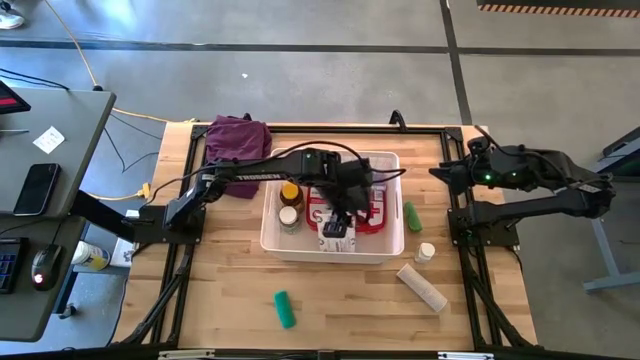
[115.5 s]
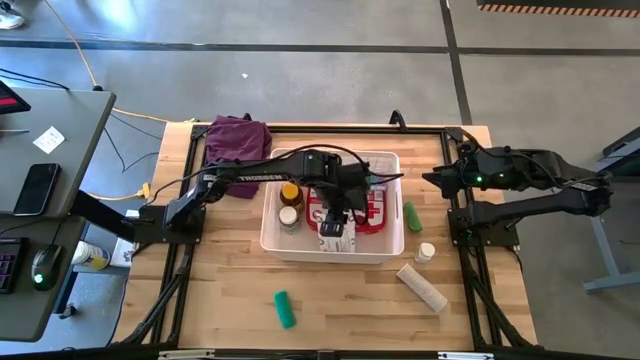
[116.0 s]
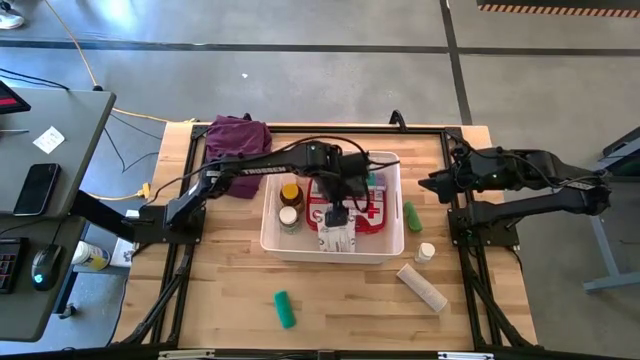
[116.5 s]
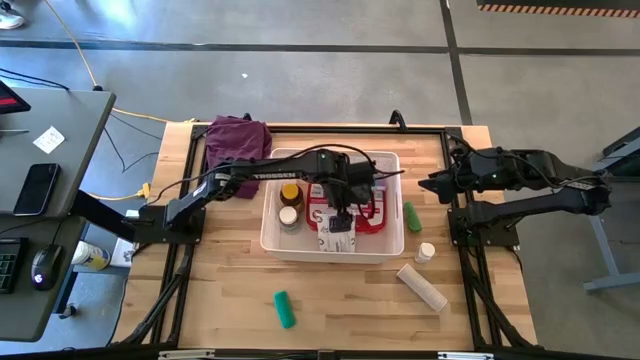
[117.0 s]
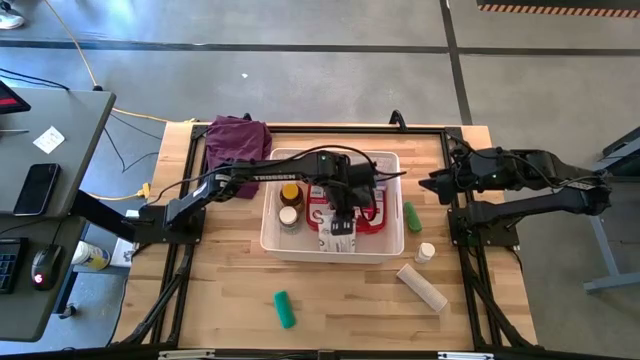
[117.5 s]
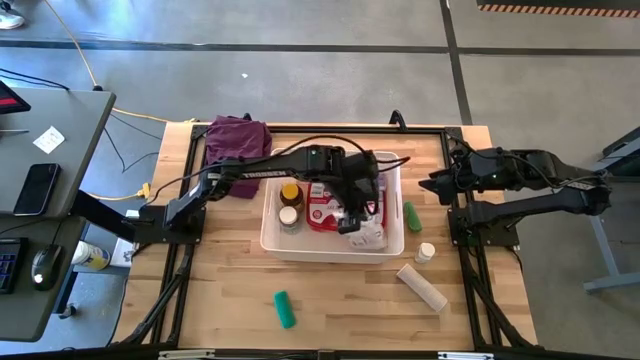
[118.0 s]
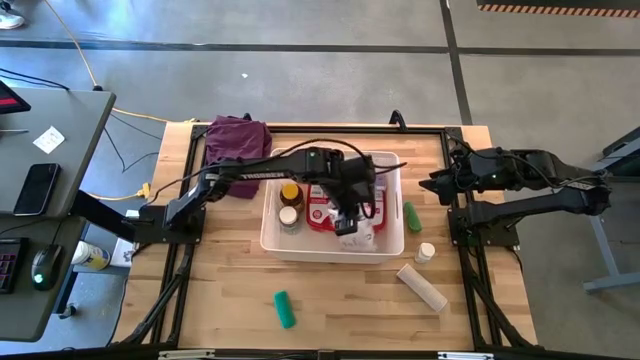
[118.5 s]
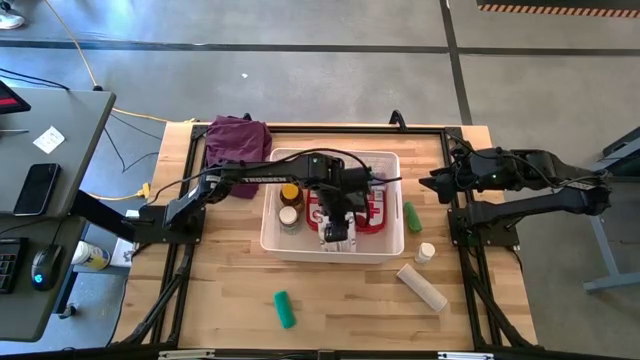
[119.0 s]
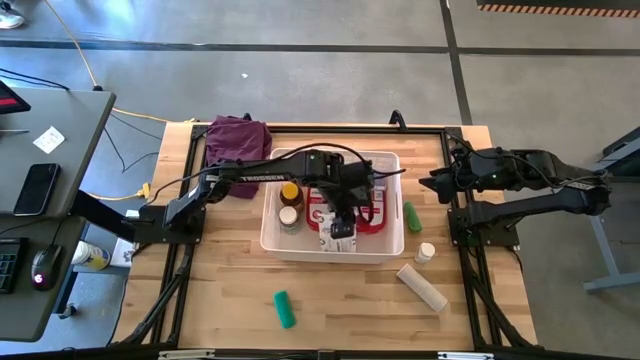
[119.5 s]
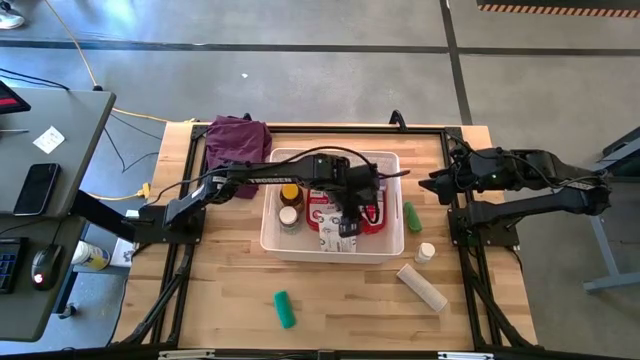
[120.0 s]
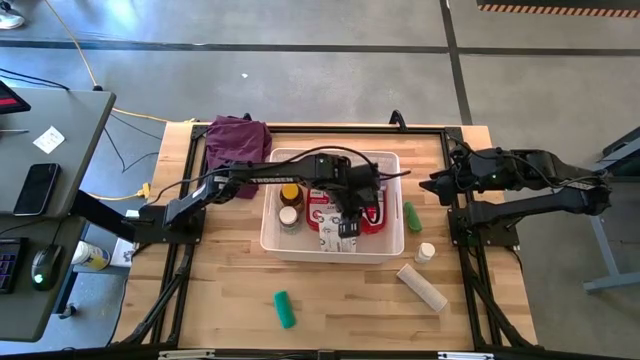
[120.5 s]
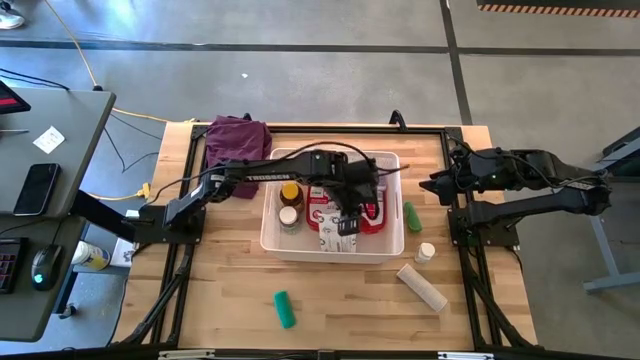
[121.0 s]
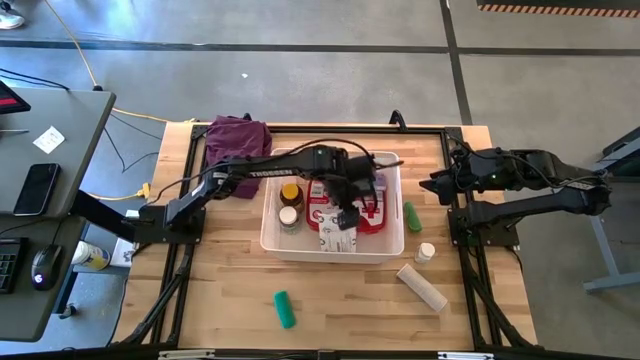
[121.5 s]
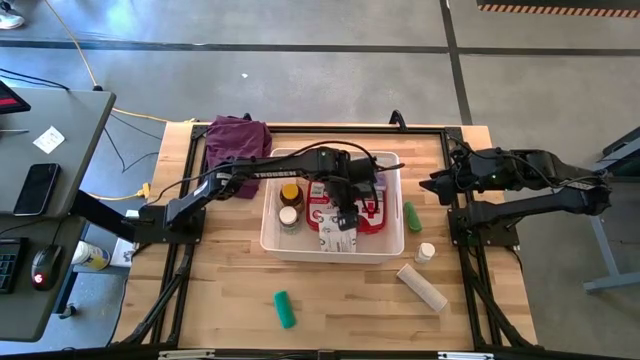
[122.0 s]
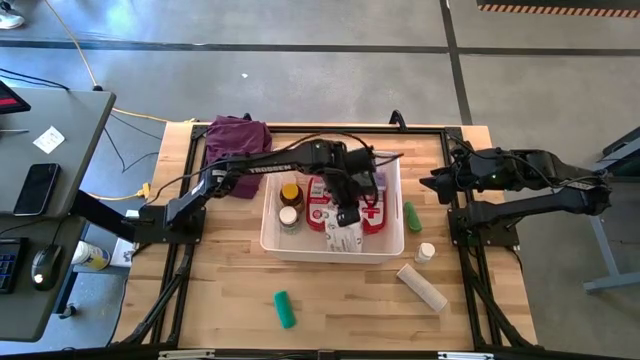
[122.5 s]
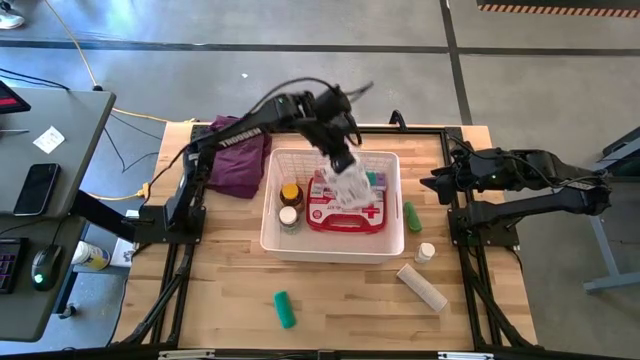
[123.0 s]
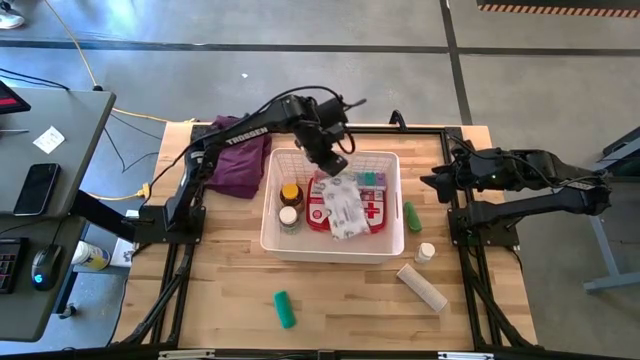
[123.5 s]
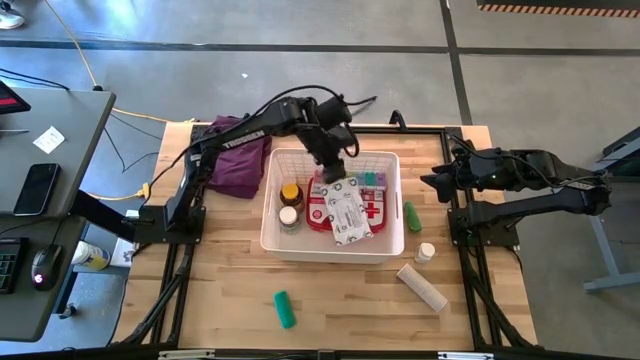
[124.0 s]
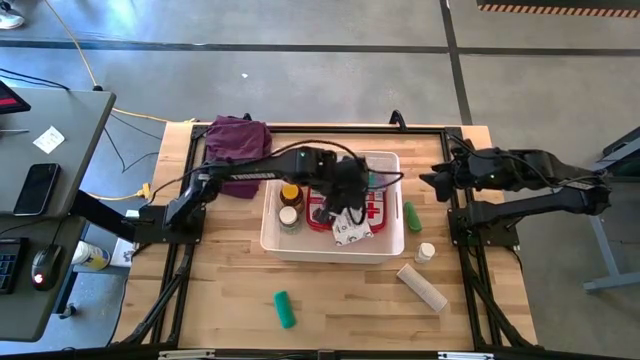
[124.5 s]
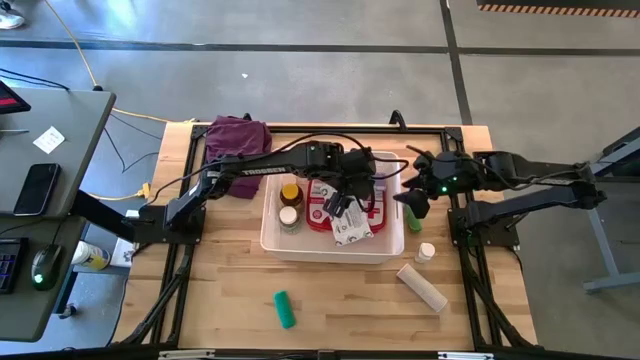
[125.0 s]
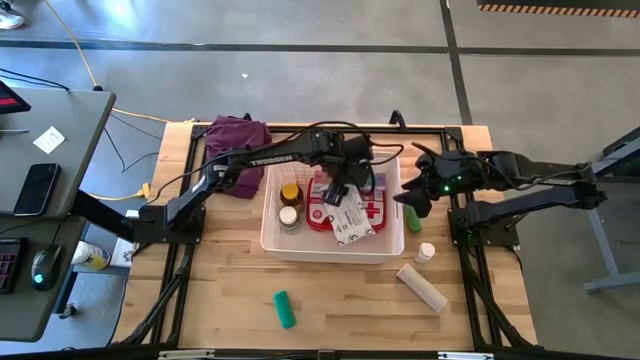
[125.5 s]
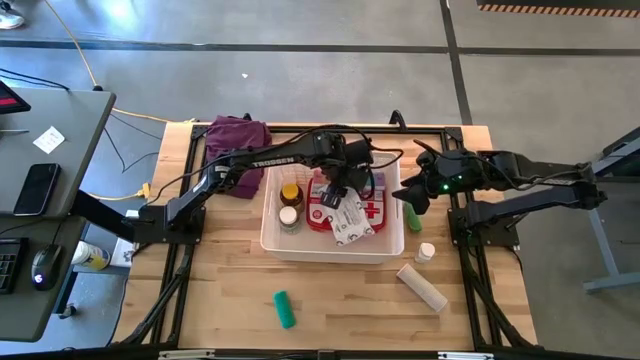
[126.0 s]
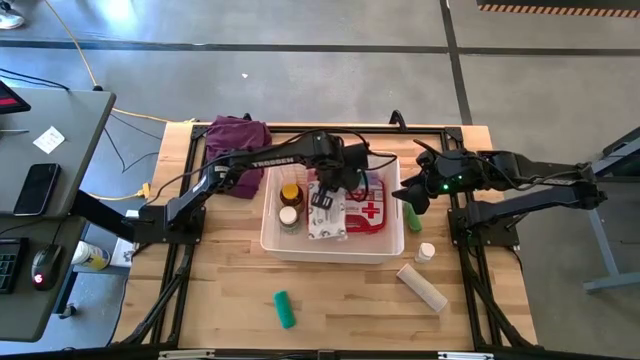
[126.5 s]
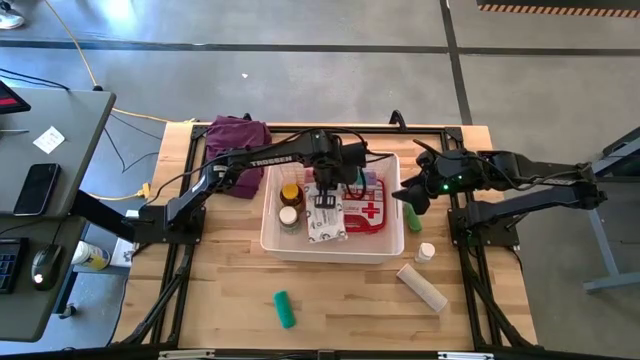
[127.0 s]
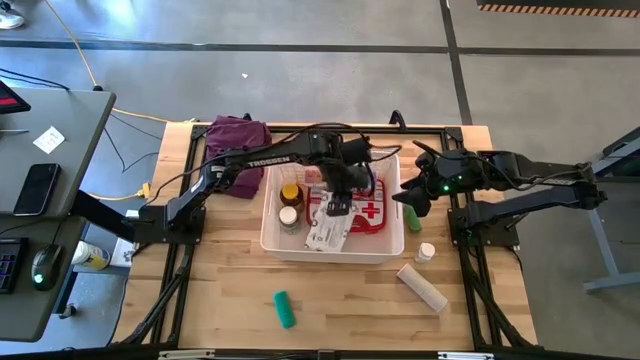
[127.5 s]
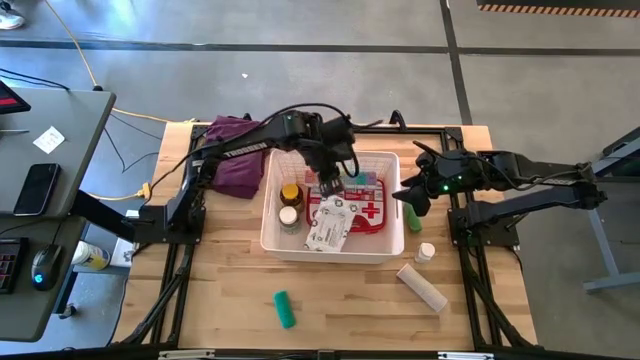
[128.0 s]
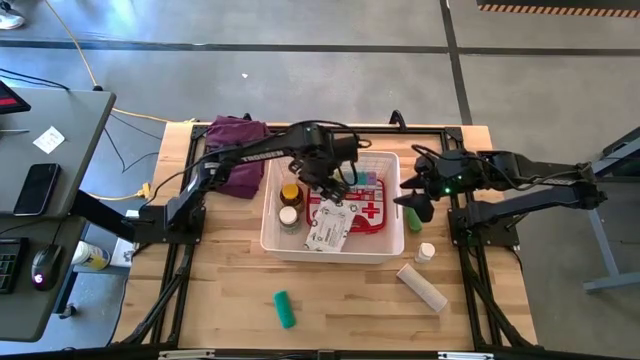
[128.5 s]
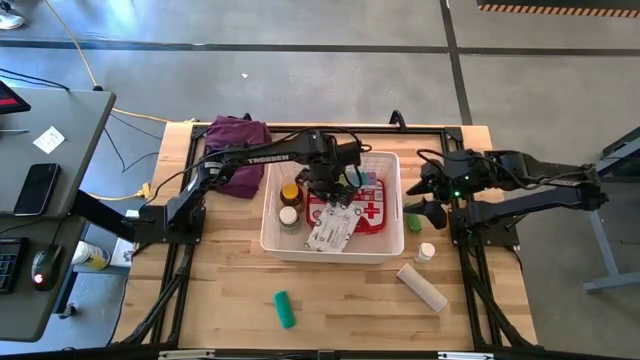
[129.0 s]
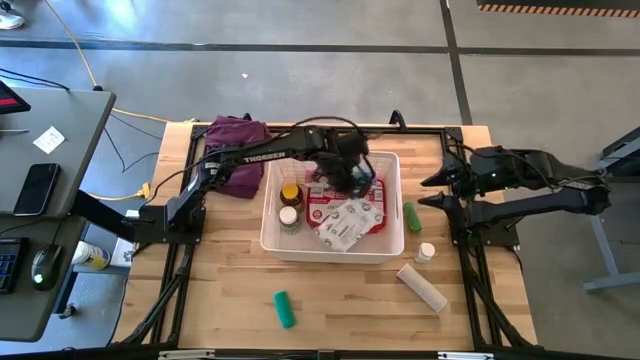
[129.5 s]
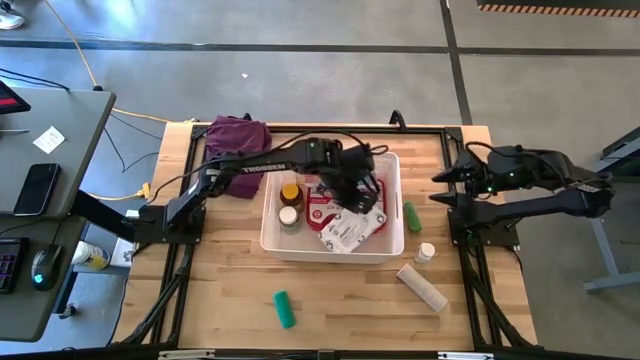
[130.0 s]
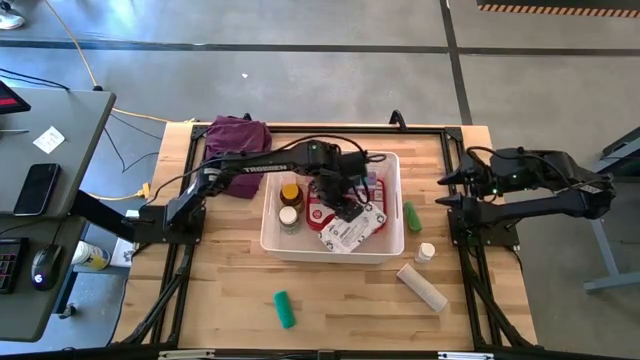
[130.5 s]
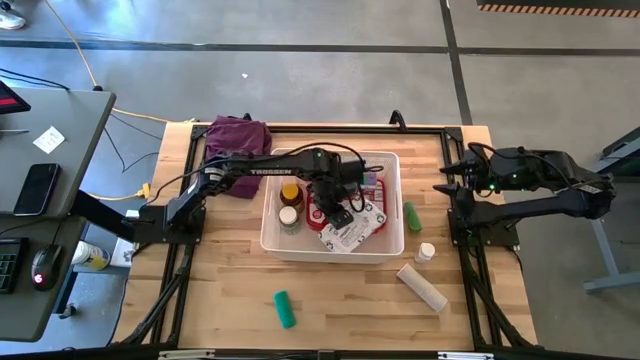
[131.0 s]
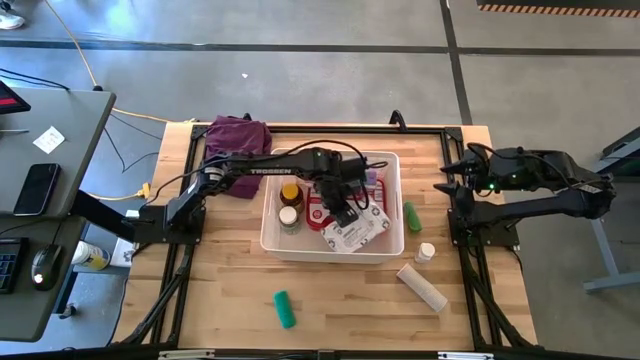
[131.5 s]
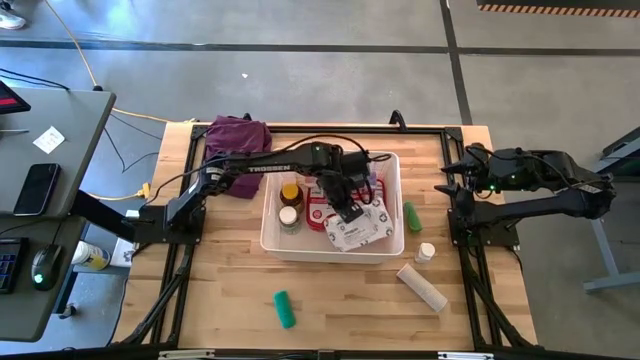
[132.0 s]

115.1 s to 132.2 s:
Task: Pick & place medical supplies in basket/bin
Put the white mailer bag into the white bin

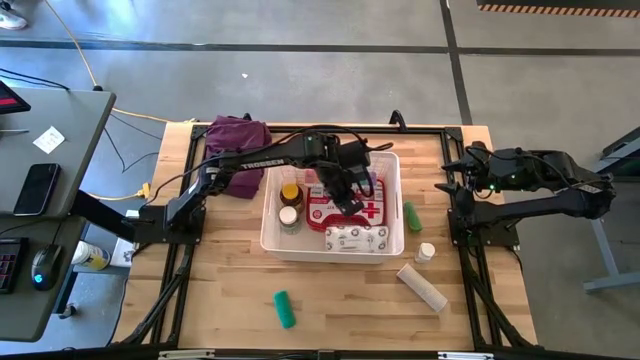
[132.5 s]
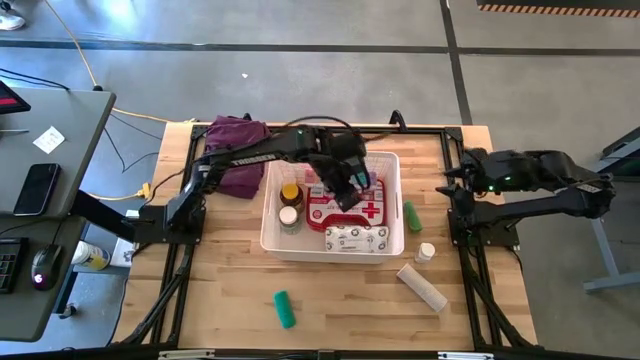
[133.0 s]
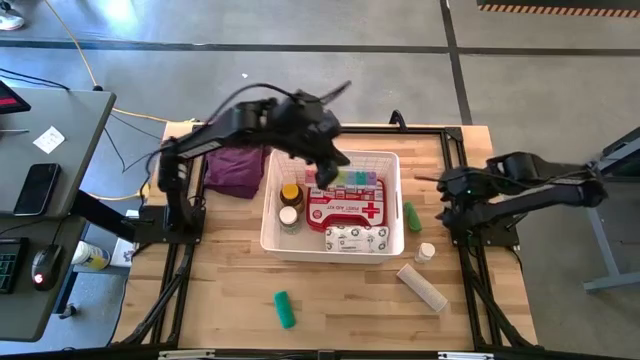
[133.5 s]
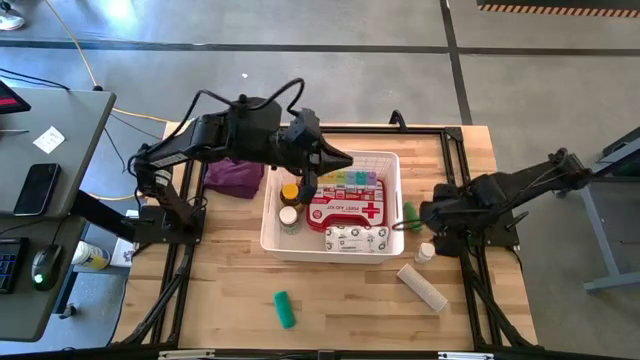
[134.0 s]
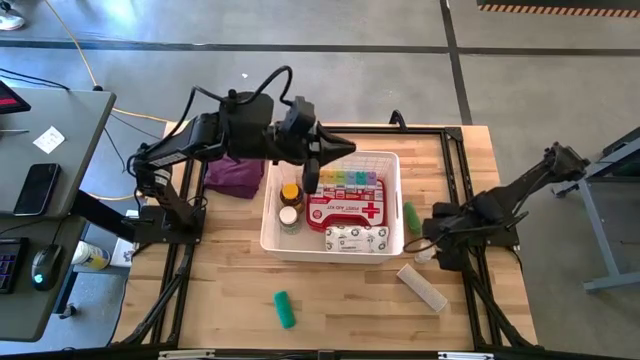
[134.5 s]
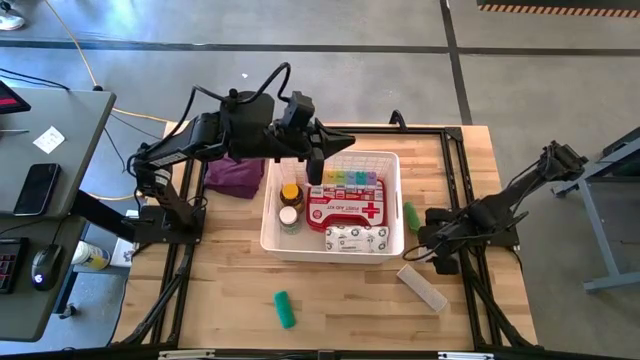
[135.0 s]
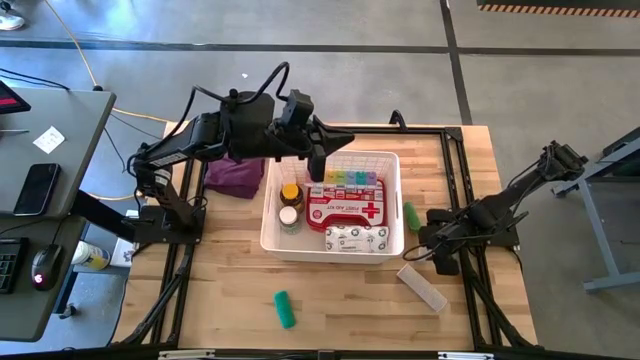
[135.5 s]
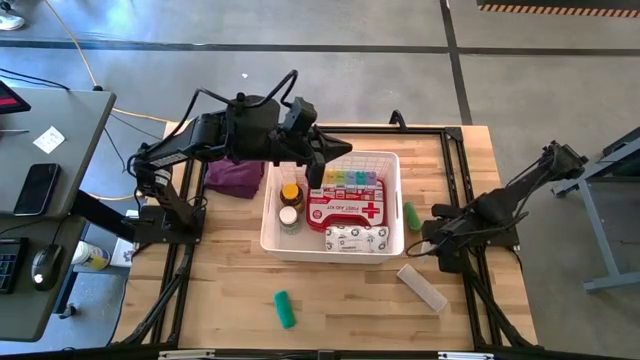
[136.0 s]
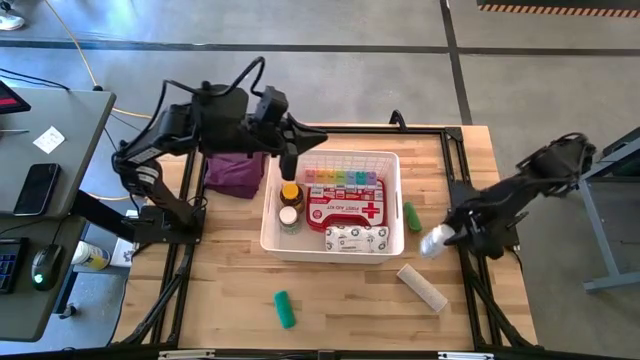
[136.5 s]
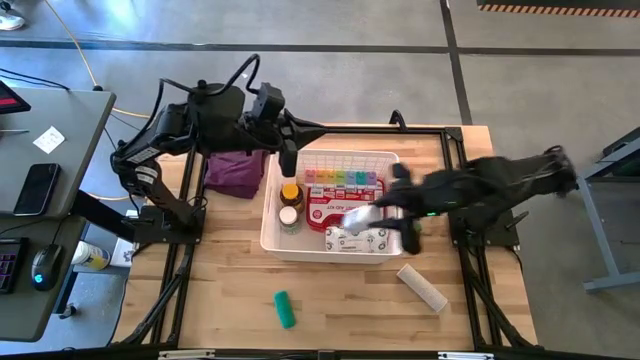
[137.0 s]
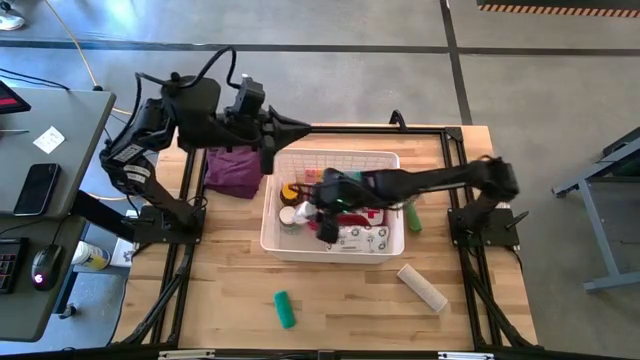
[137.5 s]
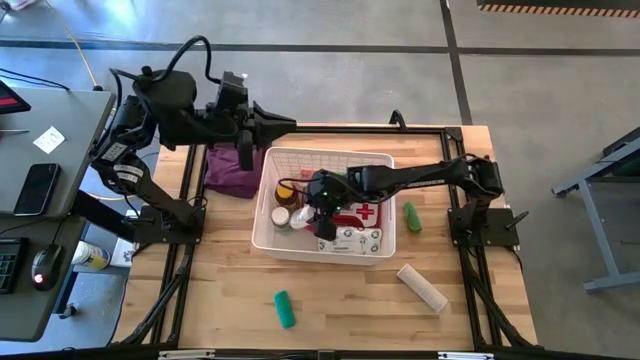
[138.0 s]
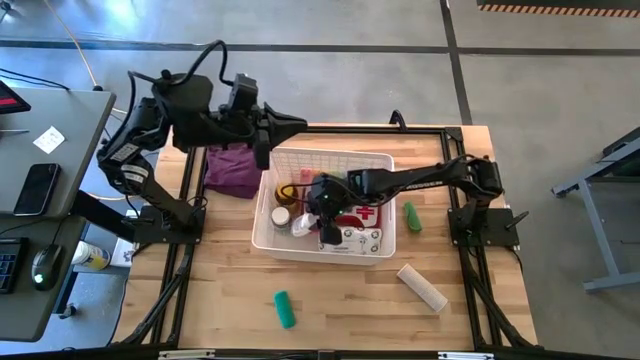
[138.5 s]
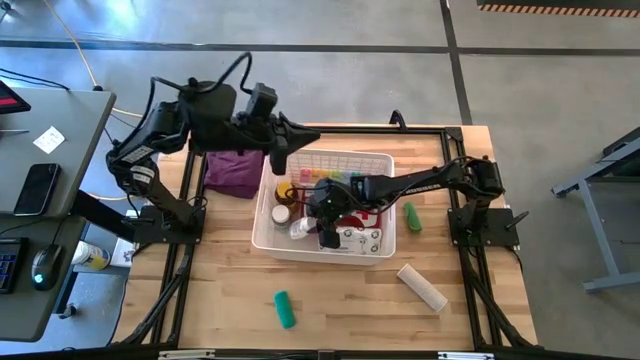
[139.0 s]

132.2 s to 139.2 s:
Put the white medicine bottle into the white bin
